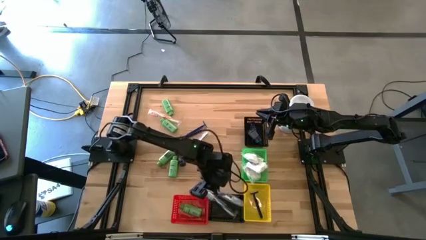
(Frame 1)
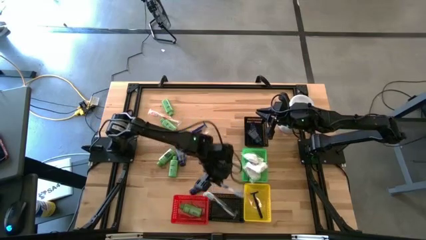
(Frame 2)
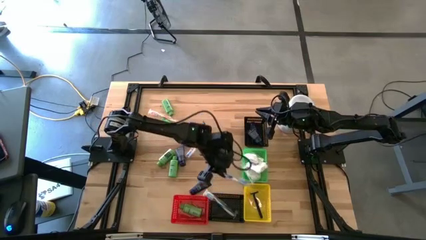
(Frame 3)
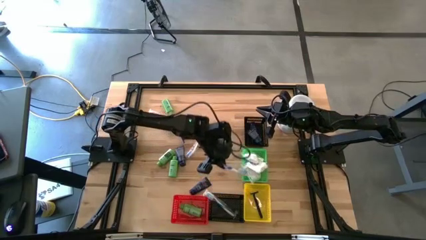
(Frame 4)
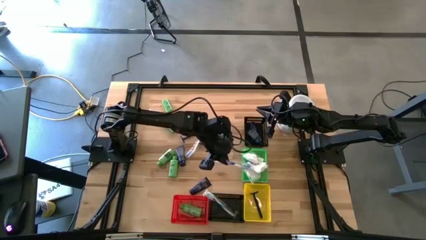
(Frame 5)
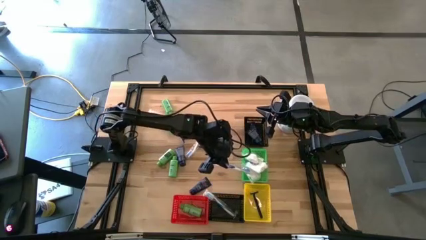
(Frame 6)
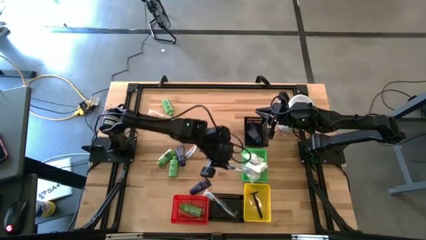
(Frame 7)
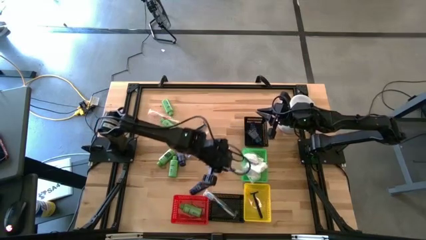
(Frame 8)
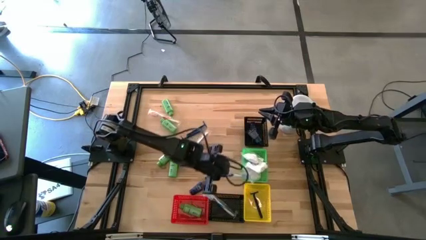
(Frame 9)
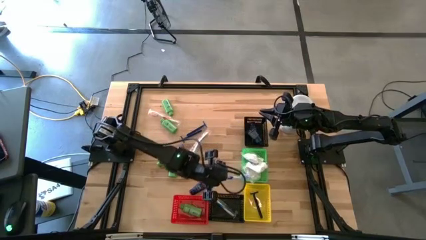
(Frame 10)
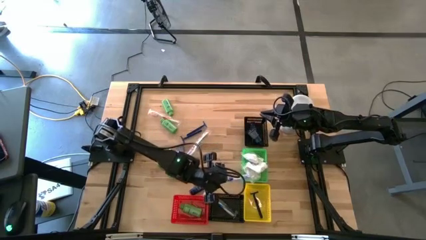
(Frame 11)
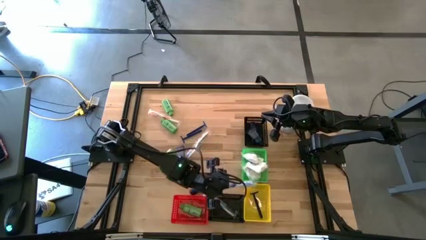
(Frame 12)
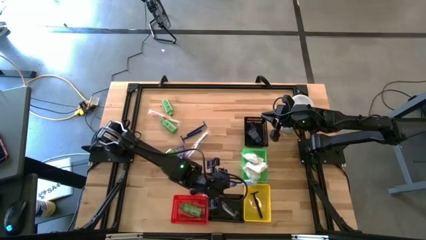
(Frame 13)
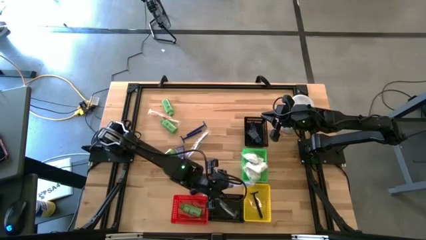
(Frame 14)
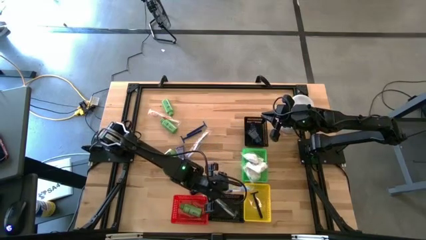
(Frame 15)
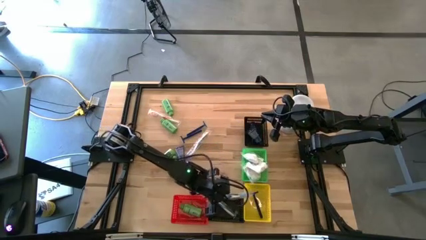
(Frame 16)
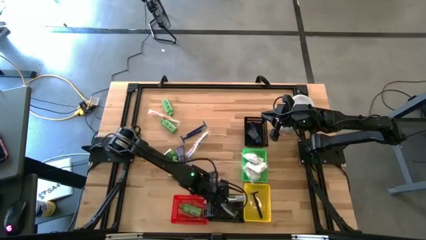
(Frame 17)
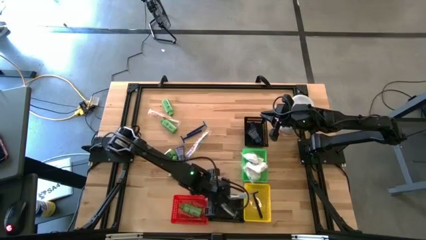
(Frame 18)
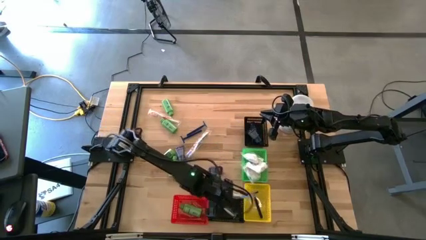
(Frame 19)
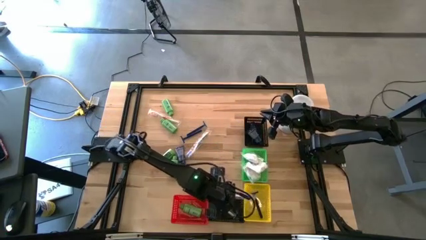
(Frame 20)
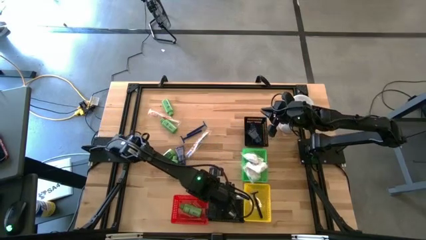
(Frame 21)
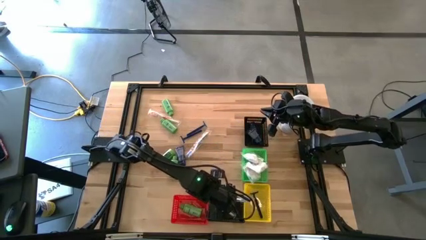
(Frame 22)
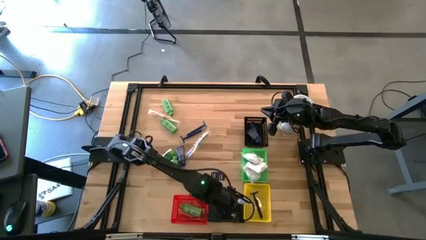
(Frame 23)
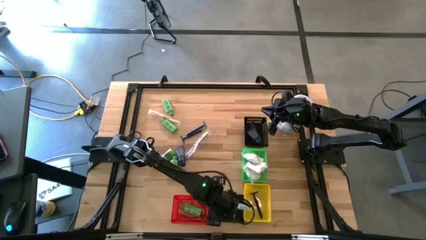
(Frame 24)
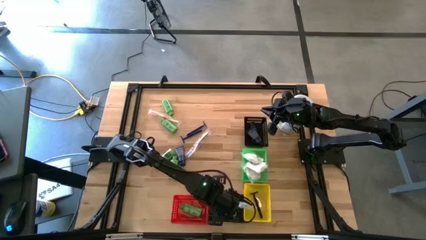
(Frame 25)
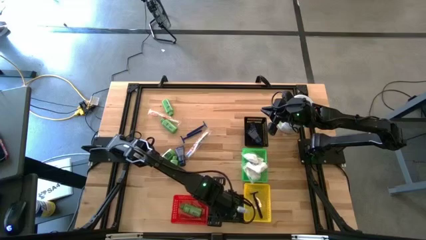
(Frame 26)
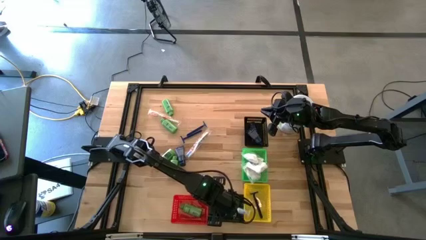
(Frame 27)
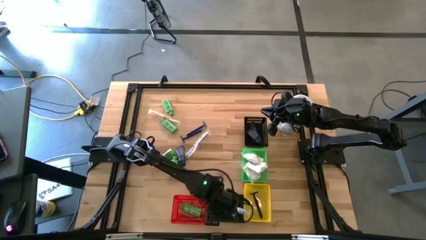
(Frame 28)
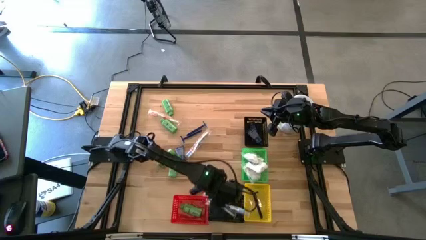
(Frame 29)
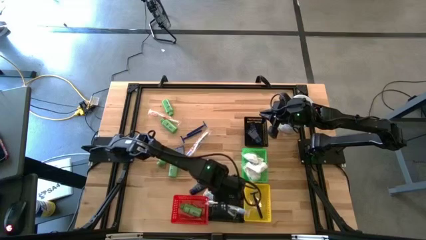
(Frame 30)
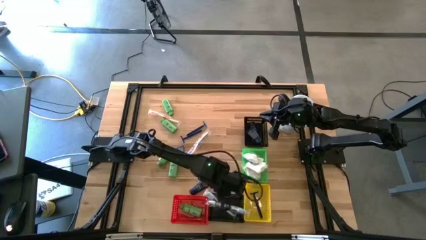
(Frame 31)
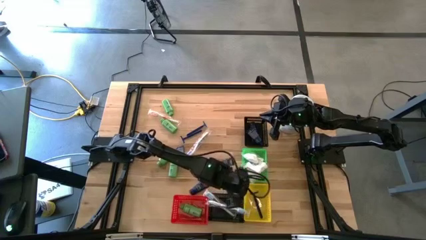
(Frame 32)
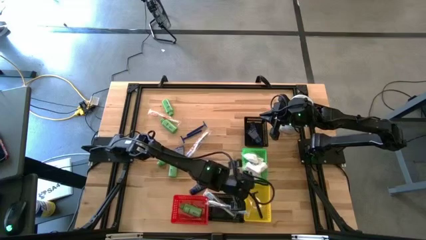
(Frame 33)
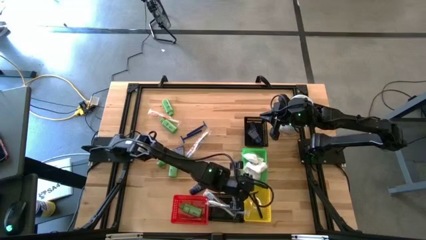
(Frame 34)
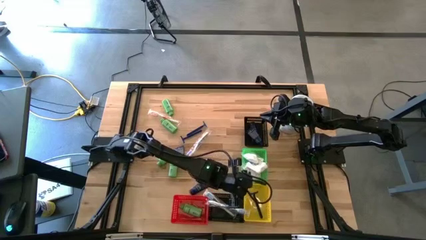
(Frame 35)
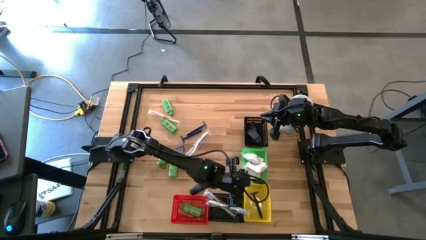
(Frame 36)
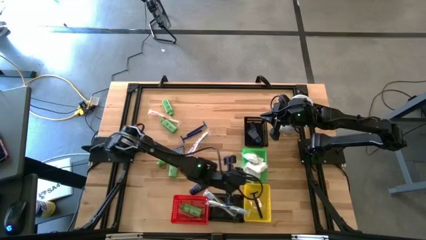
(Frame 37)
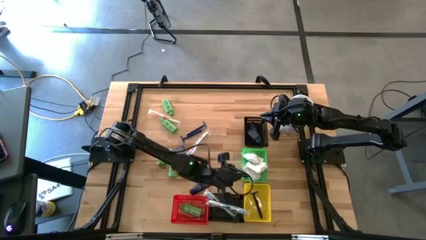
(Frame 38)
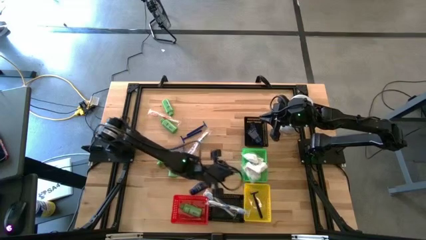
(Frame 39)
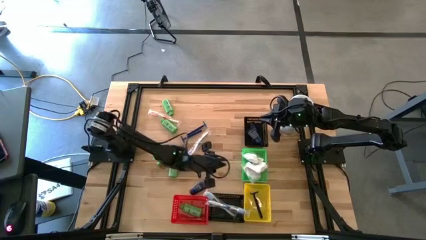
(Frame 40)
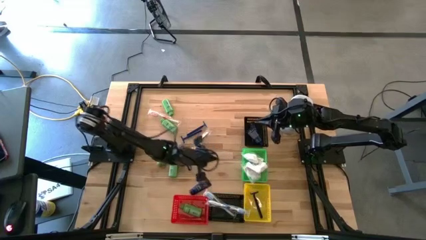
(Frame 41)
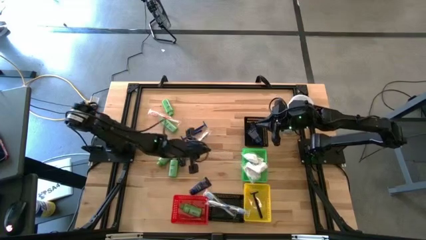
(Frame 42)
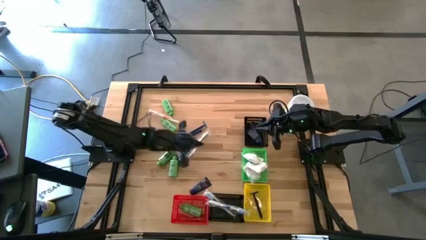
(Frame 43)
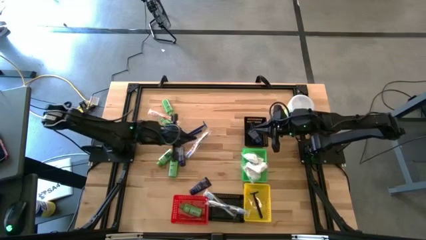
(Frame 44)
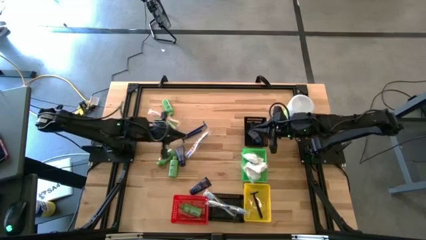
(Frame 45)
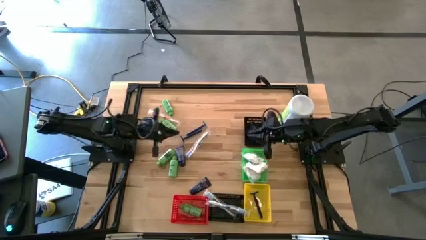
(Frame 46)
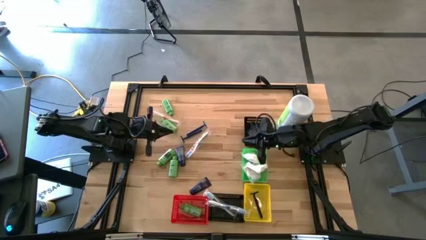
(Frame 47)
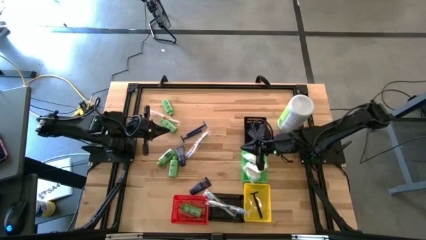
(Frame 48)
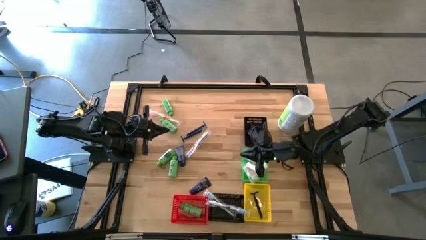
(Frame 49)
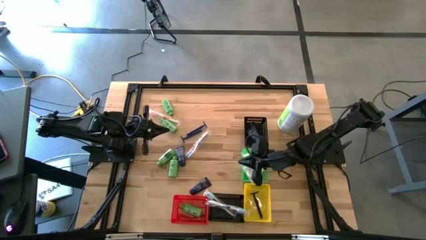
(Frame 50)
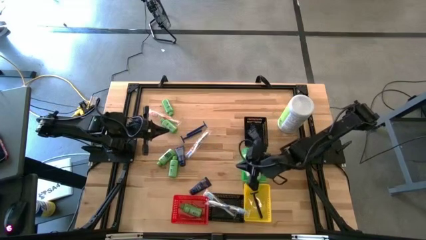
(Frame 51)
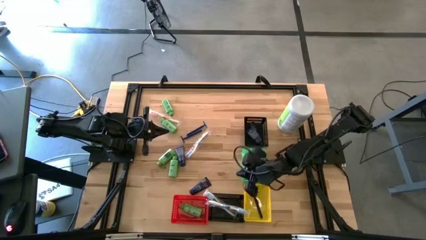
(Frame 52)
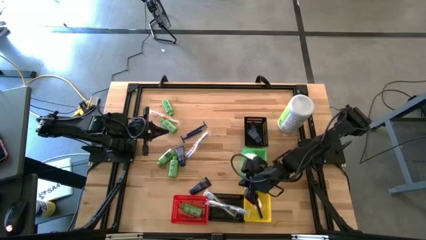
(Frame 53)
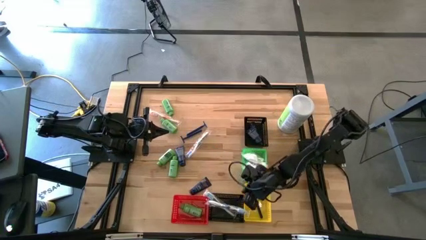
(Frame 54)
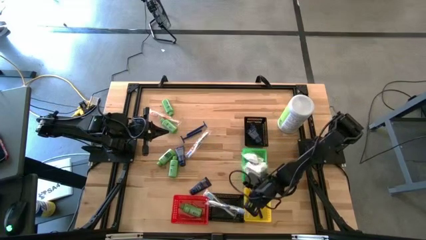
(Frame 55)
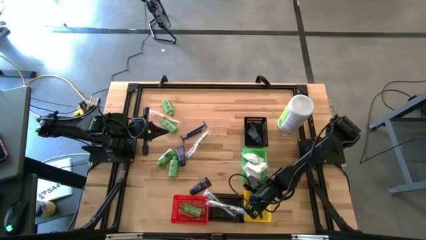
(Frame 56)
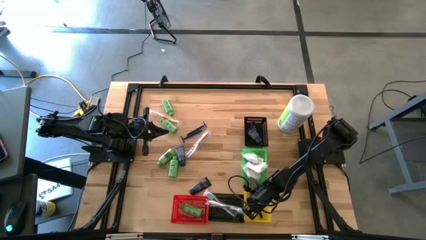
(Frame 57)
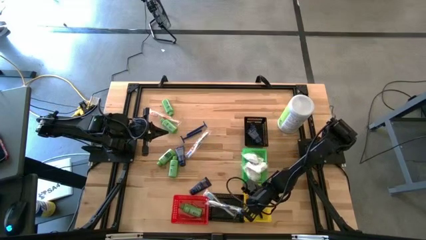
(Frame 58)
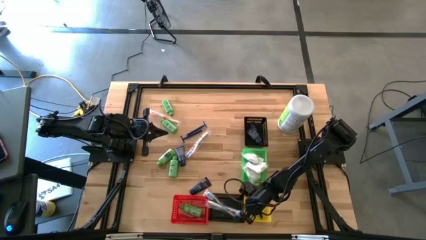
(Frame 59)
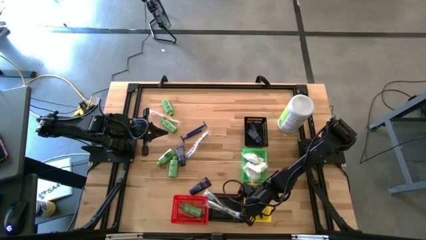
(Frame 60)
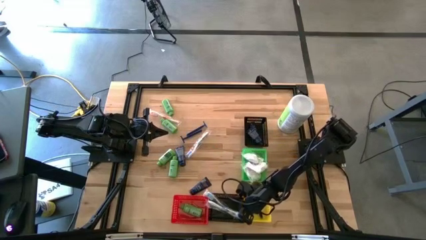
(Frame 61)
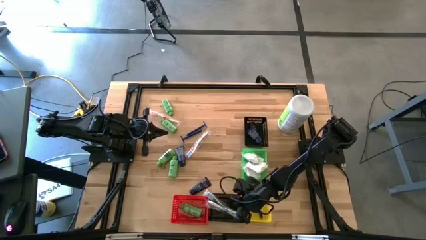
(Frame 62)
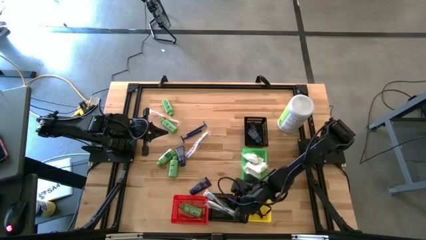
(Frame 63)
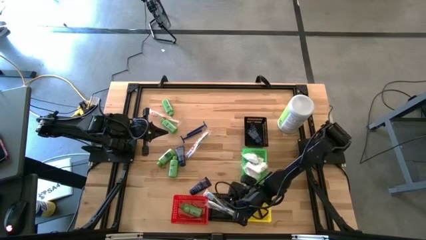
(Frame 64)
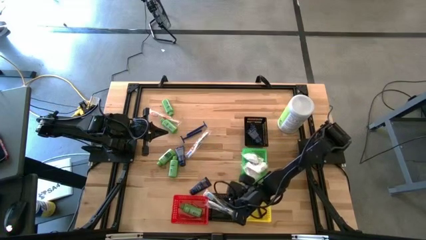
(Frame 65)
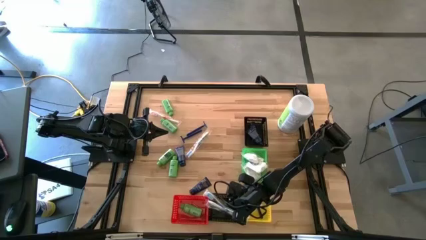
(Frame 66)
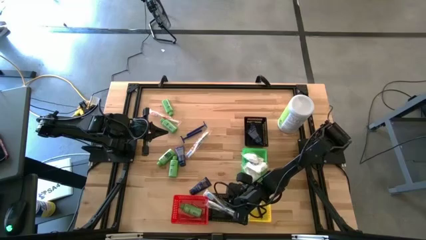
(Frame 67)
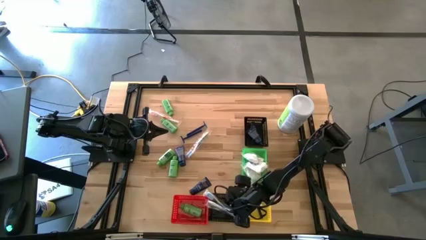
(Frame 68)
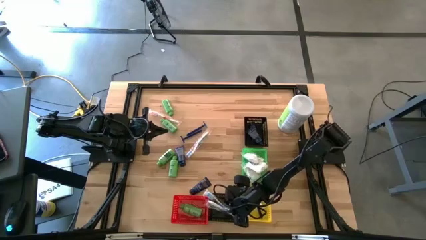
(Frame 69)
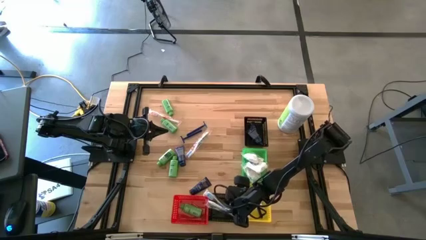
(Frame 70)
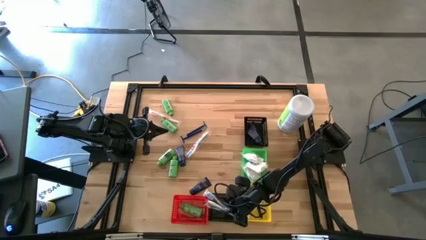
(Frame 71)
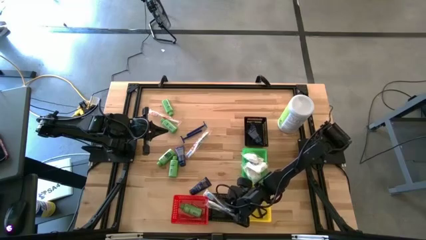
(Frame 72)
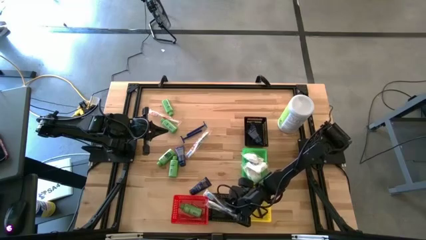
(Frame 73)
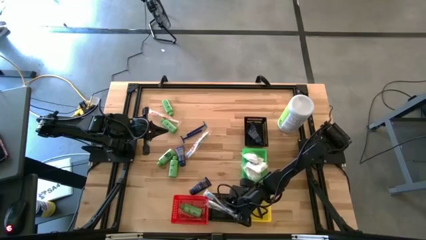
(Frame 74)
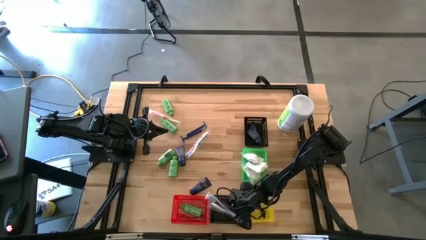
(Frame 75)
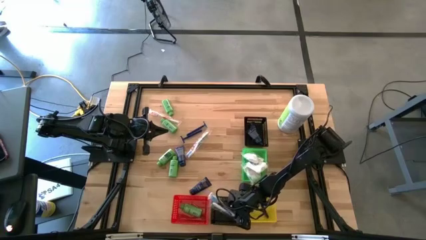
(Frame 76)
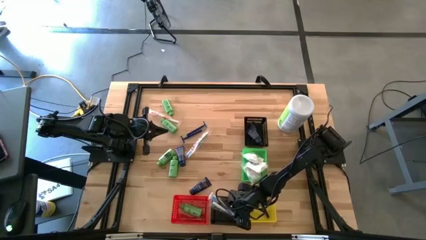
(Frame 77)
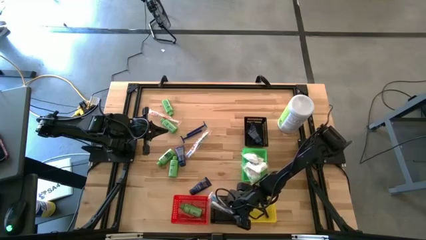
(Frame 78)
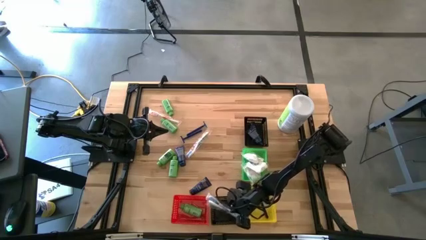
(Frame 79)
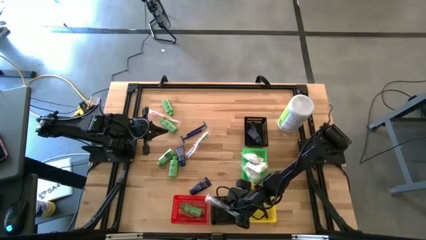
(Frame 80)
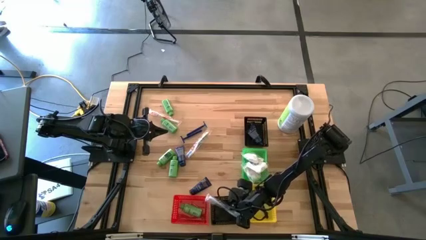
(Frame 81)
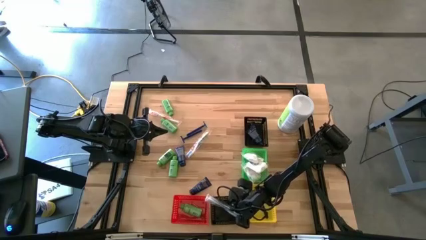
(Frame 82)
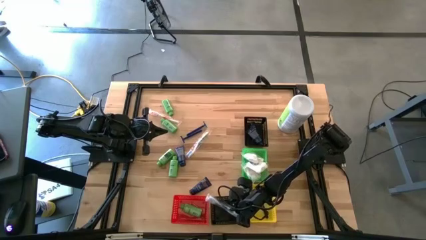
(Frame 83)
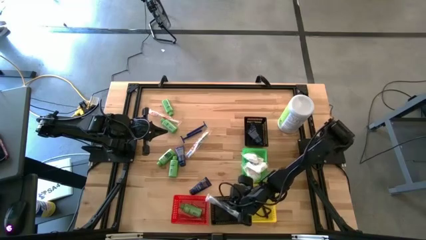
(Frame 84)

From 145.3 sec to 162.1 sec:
Task: Pick & Place Travel size toiletries
Put the dark blue toothbrush into the bottom black bin
